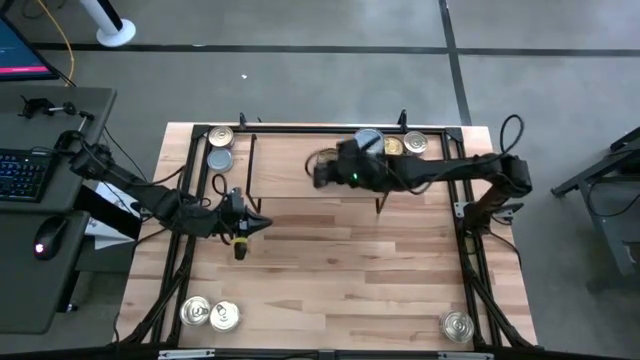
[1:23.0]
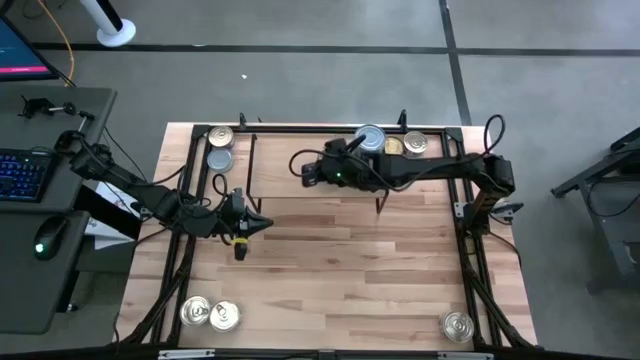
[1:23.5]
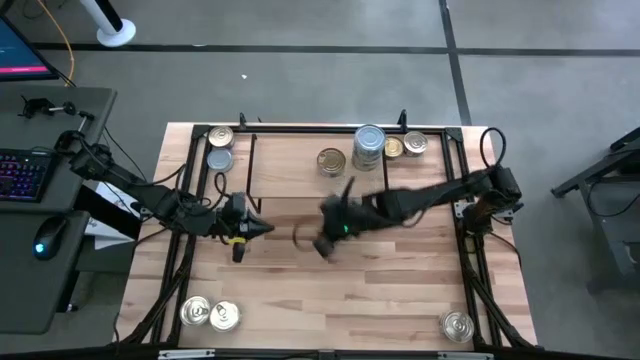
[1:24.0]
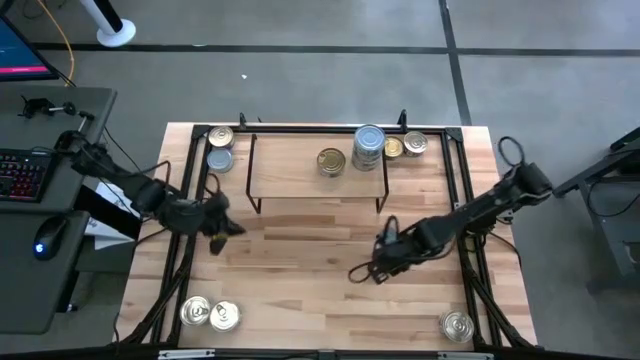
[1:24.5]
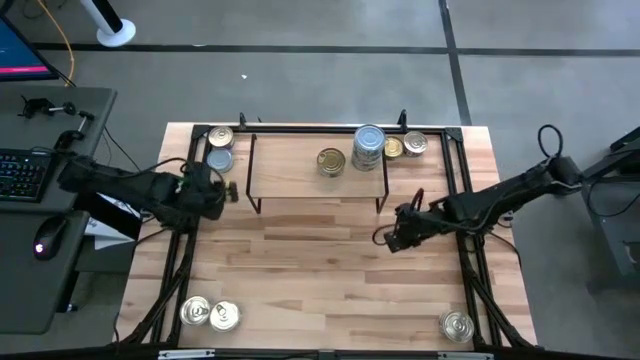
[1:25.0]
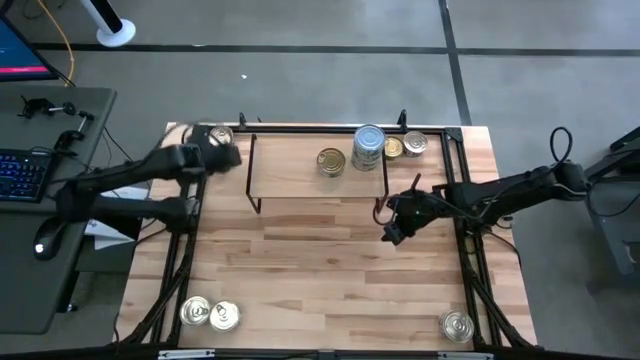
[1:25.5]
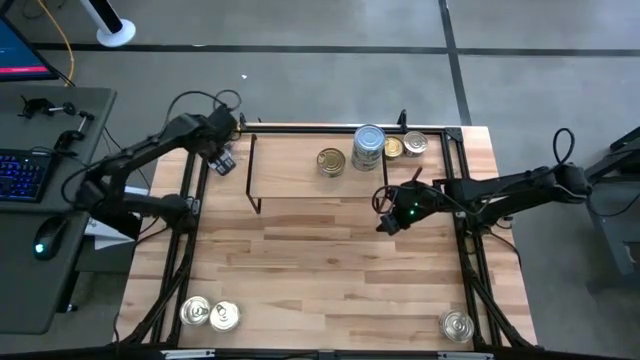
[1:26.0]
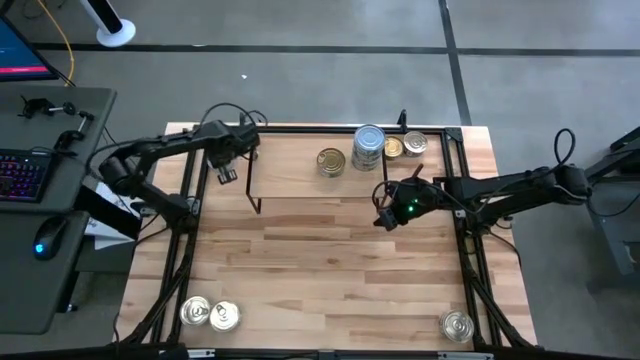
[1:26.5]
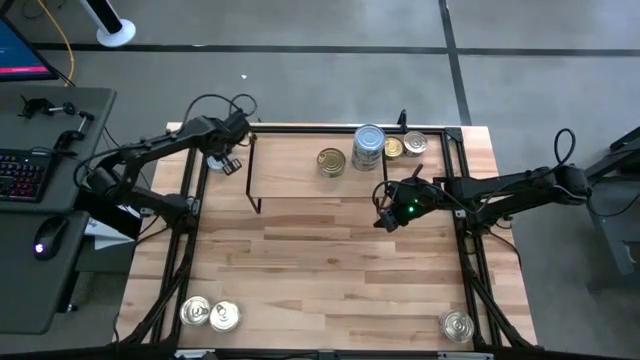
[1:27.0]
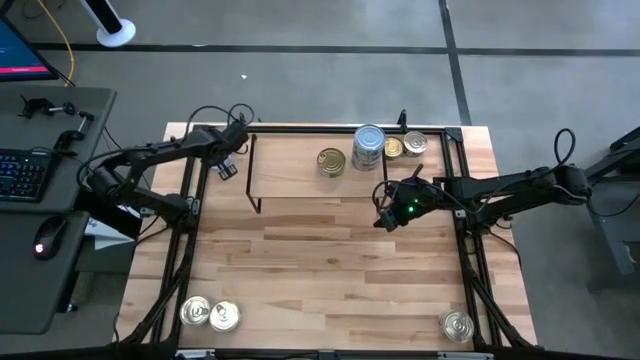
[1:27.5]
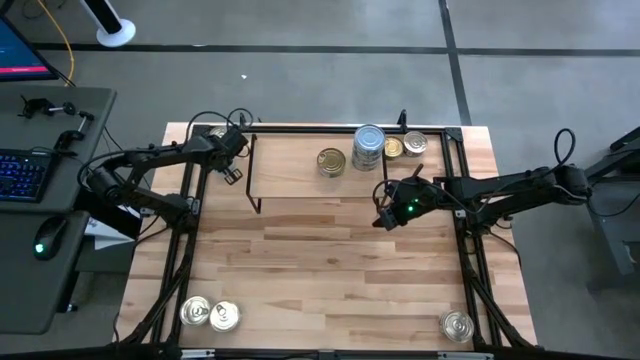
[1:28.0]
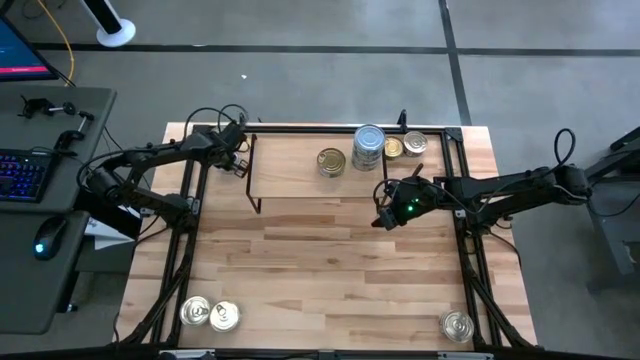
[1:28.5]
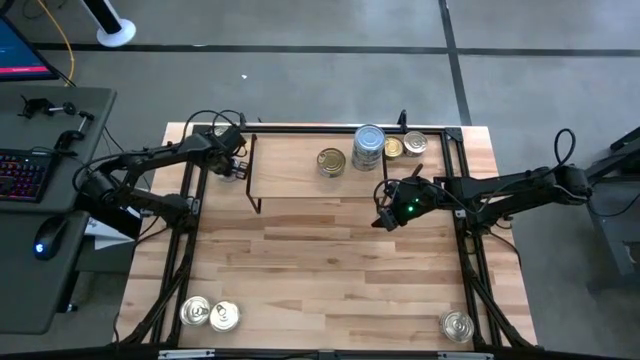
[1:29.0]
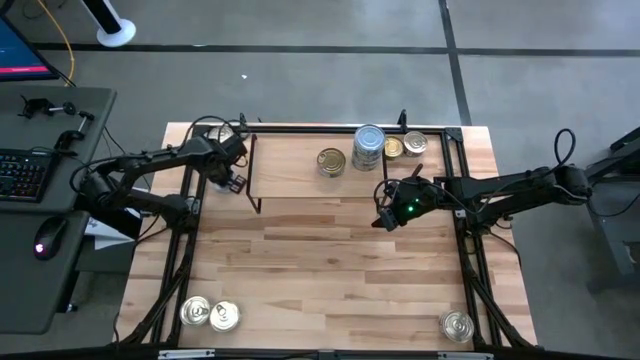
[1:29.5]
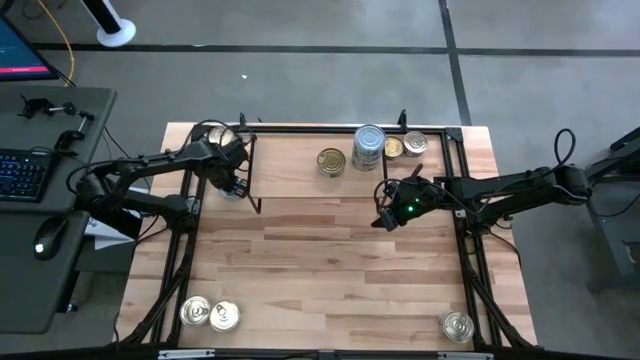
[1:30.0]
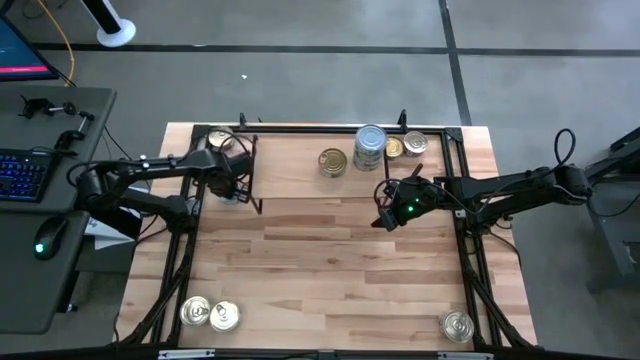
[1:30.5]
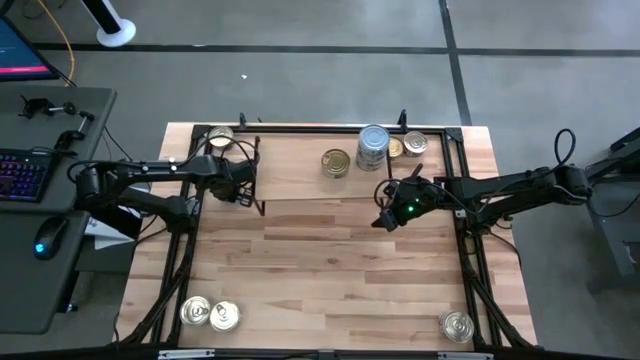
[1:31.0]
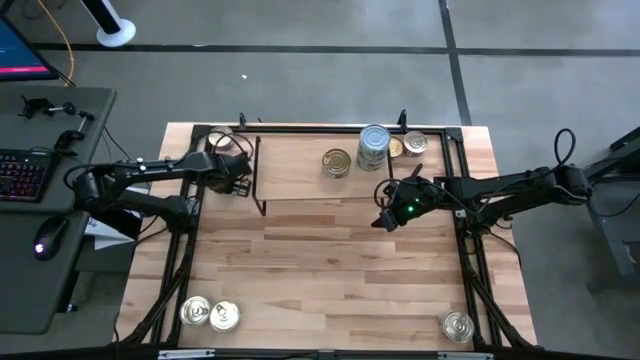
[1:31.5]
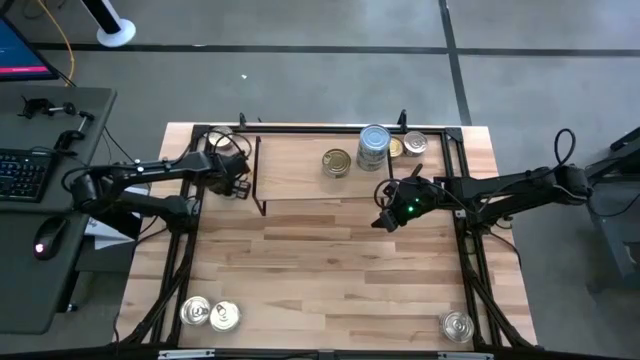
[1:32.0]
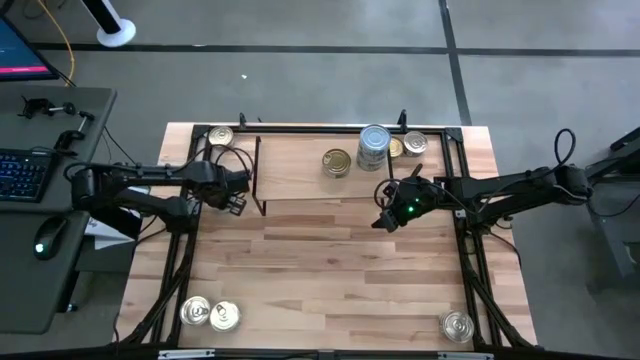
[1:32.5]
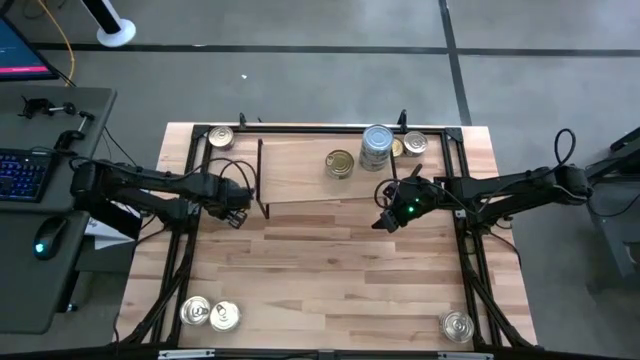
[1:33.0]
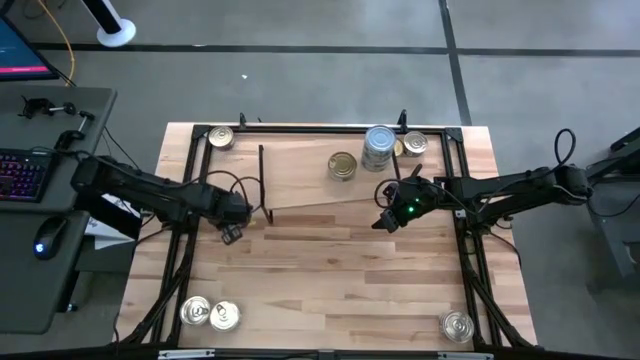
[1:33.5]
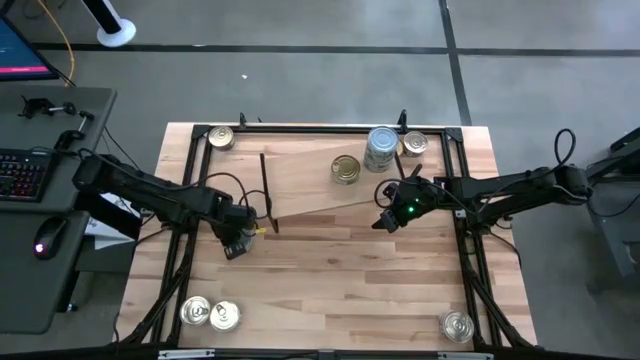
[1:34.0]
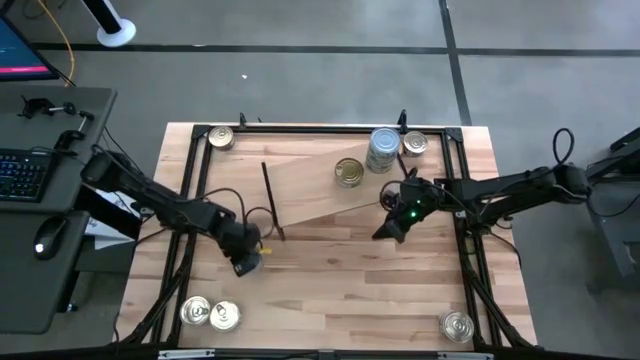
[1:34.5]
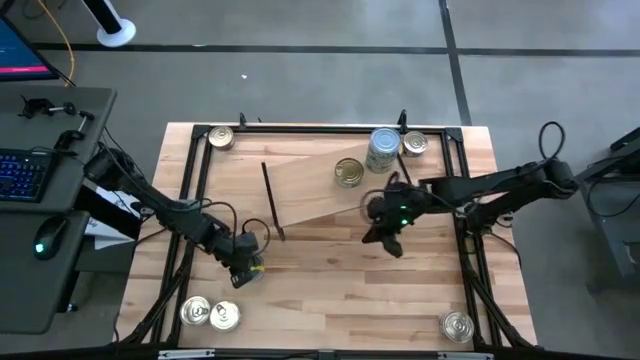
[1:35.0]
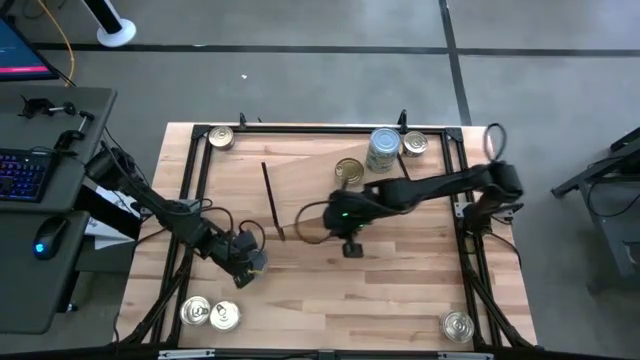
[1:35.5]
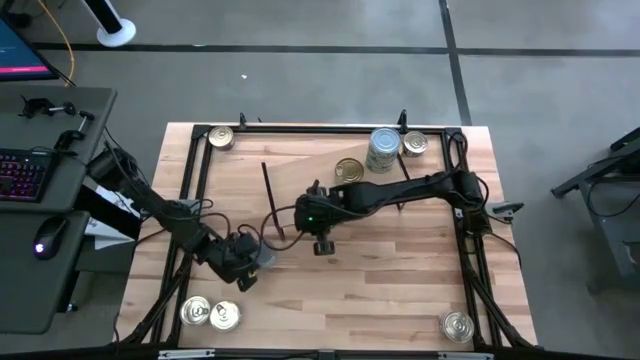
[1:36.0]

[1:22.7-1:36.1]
Task: Stack canned seafood by type on shelf
Stack the green white tuna can on top of the other green white tuna can on the shelf

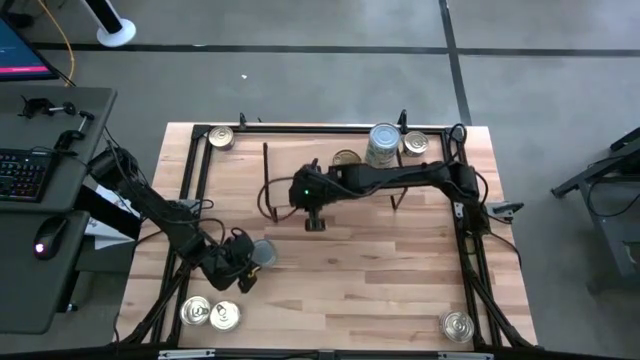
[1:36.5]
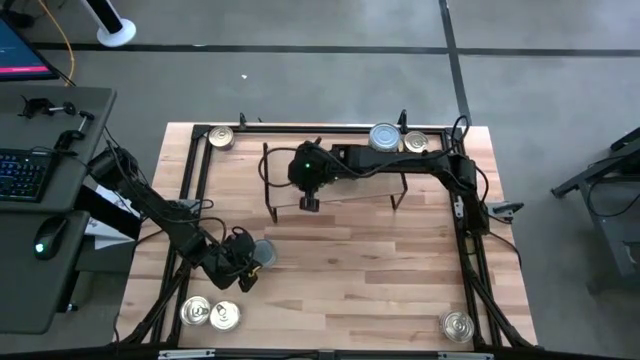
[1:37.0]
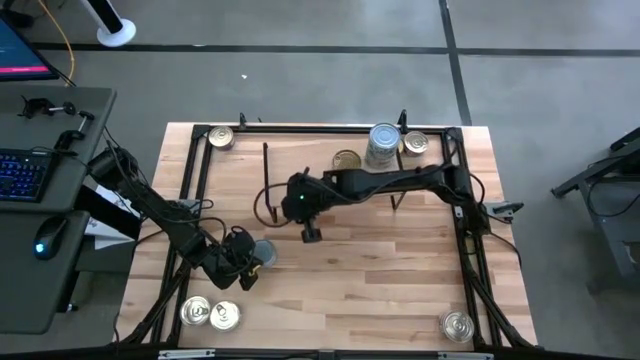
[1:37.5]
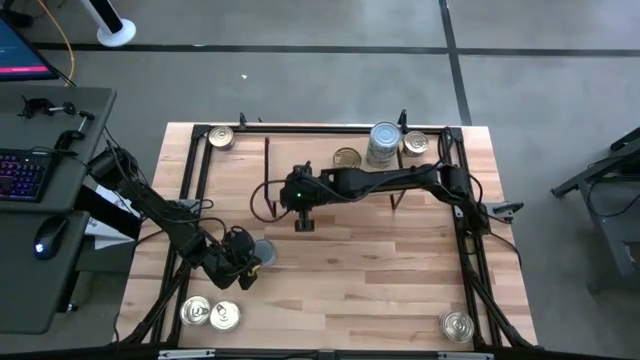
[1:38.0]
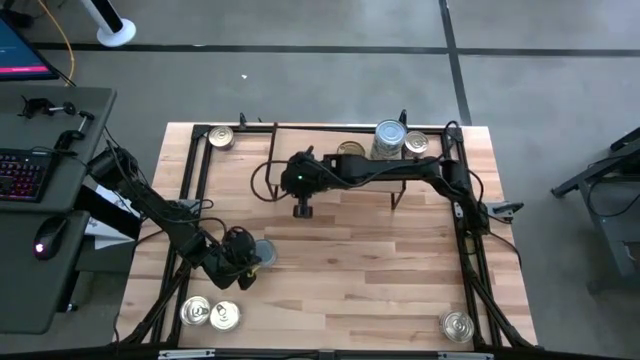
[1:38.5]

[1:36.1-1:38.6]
Adjust the shelf on the table

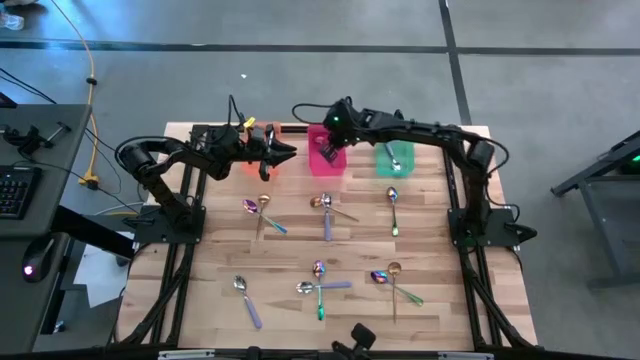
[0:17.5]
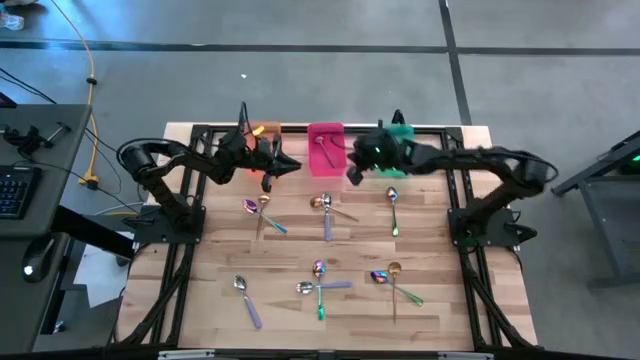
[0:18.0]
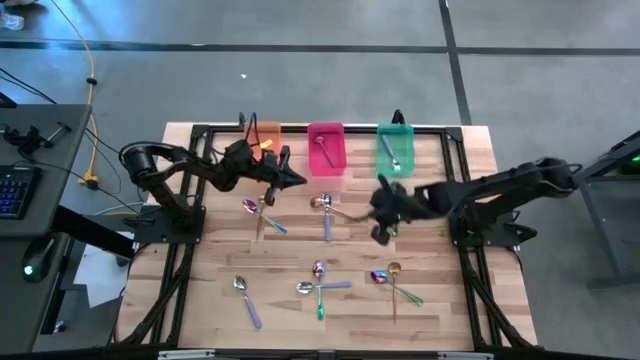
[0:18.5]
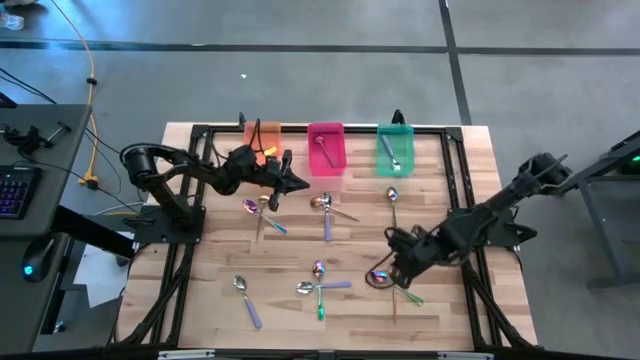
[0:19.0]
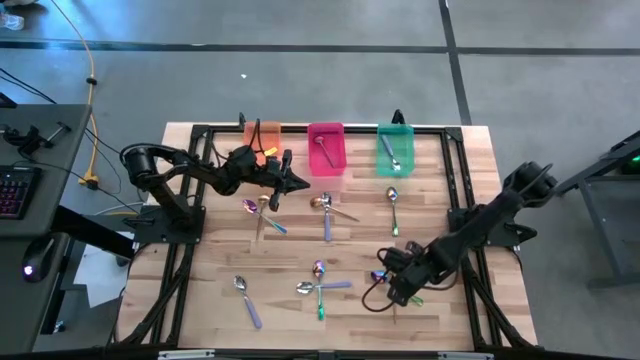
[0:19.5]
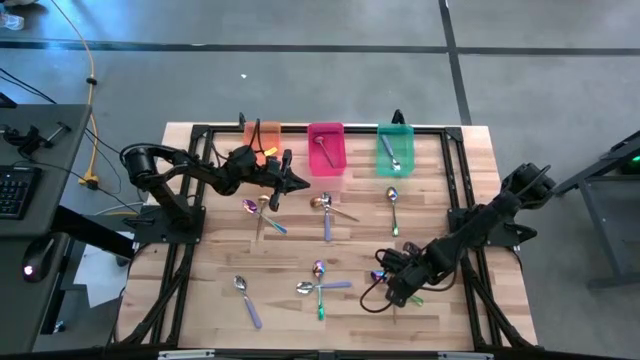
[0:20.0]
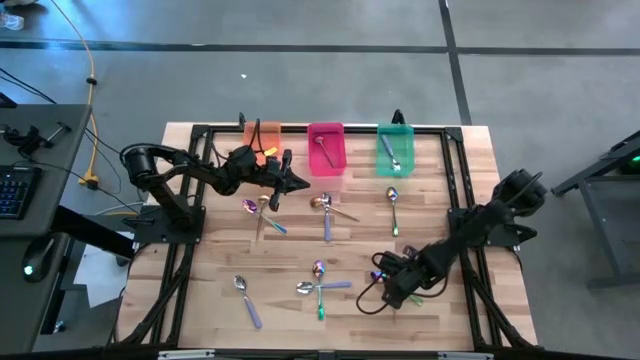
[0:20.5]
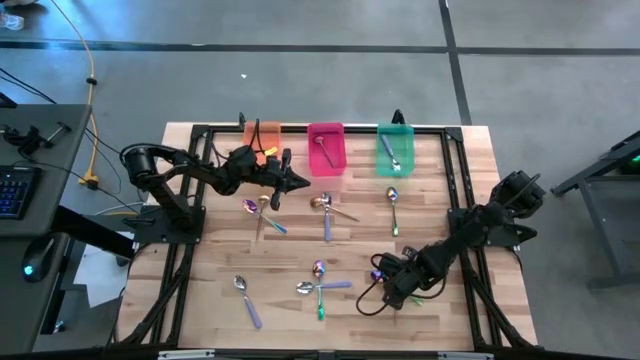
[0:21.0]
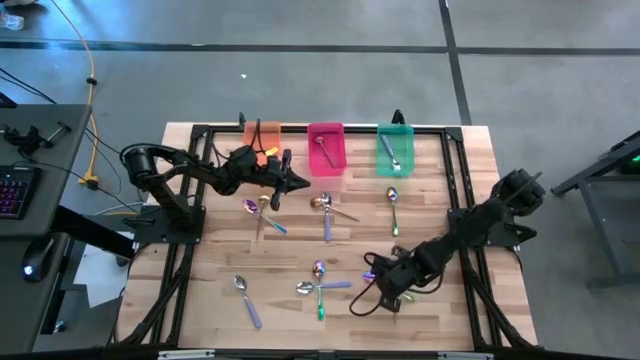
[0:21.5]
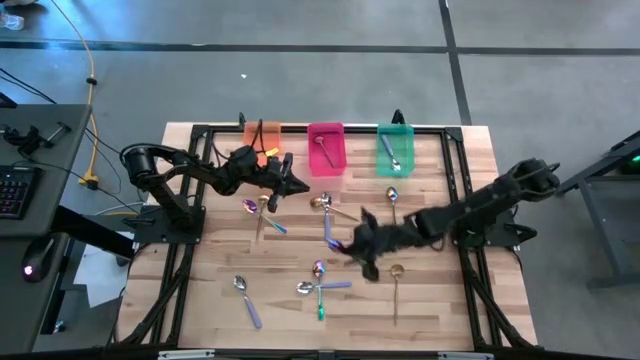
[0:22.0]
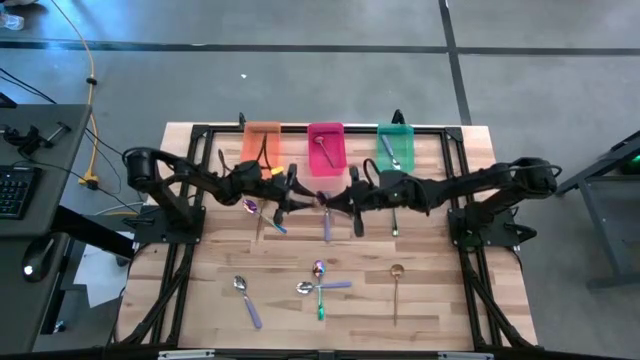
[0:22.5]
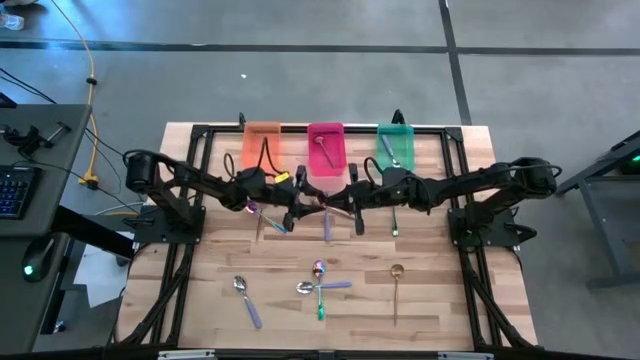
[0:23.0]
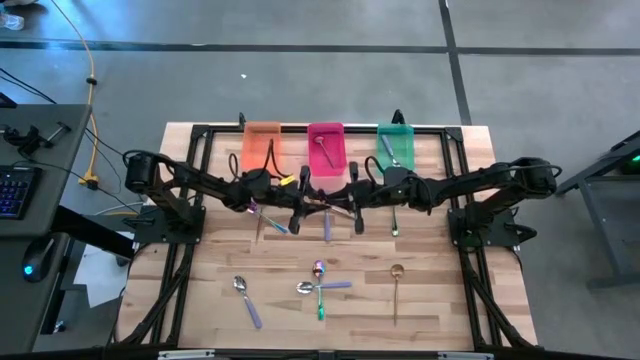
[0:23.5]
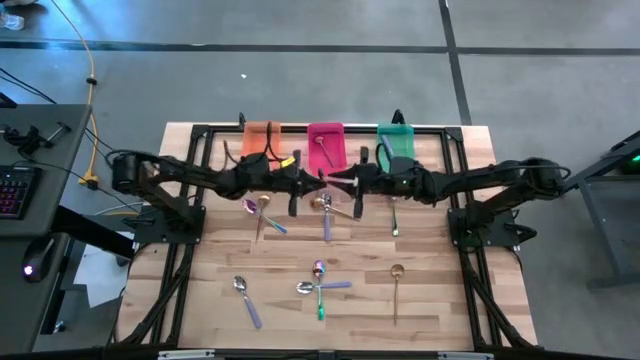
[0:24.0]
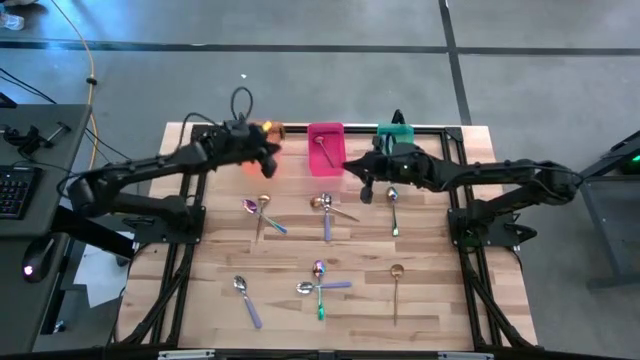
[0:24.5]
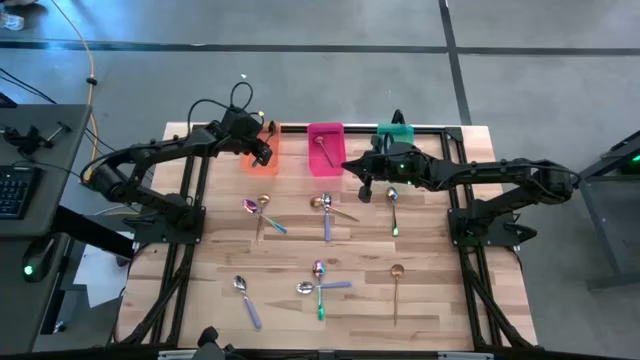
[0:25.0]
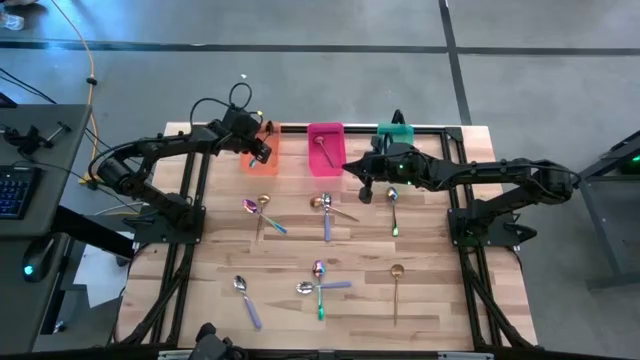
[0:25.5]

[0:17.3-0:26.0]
Task: Sort silverware by color (type)
Put the bottom right iridescent spoon into the orange bin
